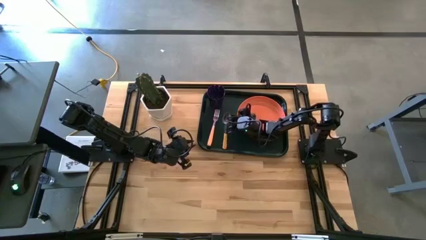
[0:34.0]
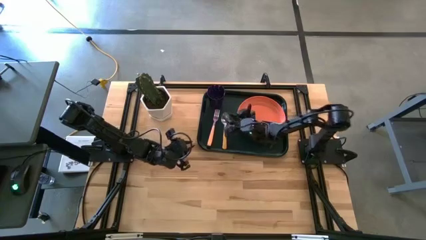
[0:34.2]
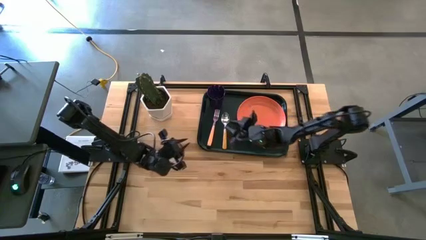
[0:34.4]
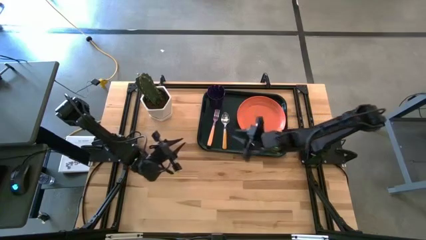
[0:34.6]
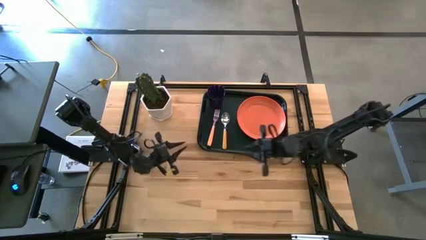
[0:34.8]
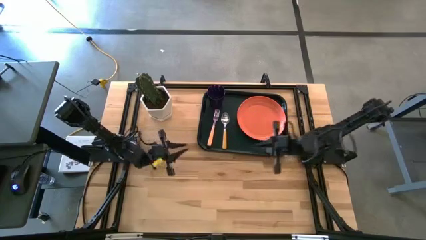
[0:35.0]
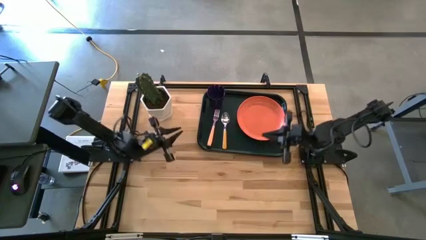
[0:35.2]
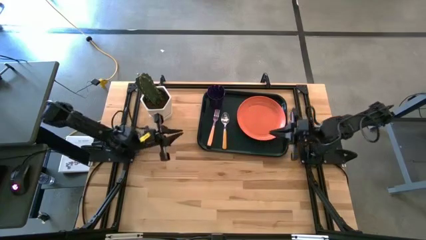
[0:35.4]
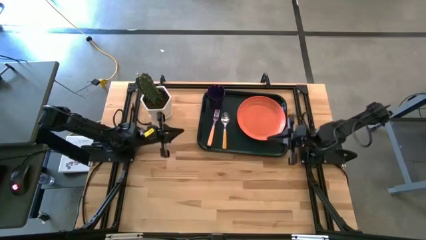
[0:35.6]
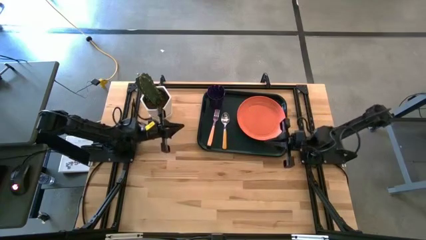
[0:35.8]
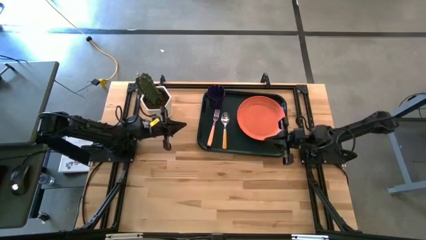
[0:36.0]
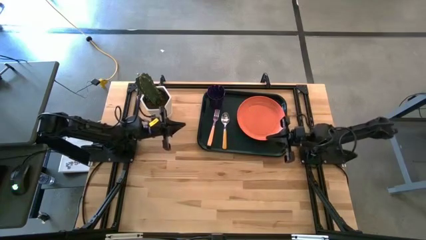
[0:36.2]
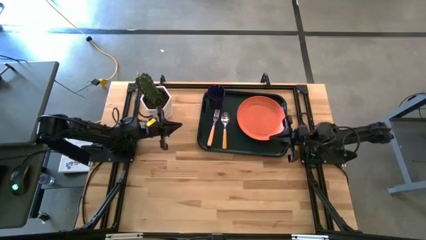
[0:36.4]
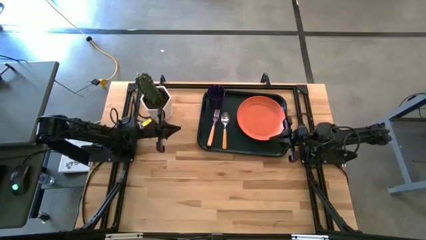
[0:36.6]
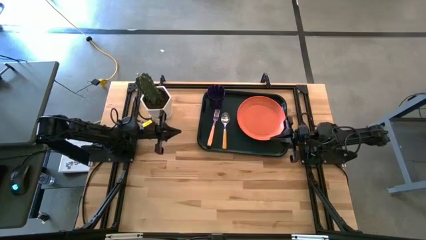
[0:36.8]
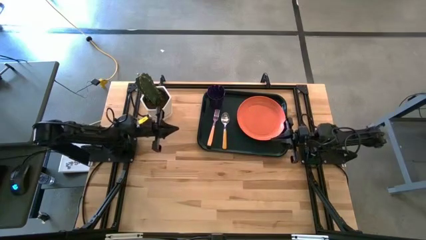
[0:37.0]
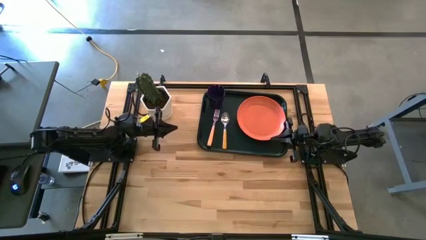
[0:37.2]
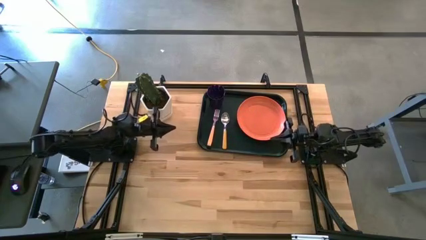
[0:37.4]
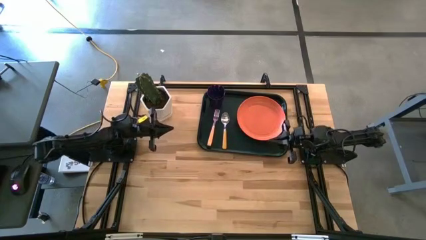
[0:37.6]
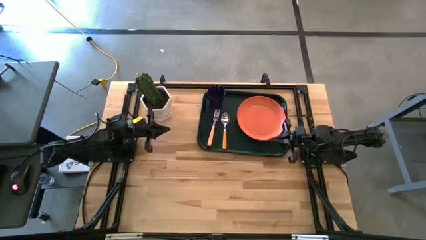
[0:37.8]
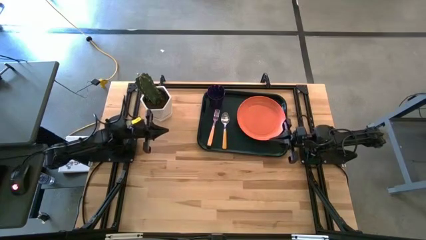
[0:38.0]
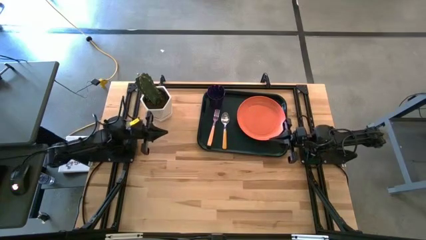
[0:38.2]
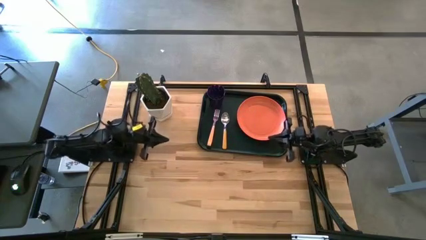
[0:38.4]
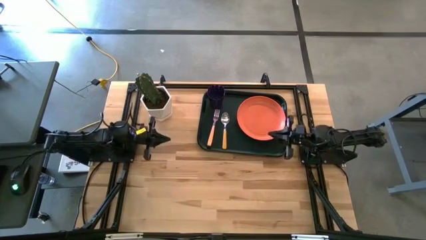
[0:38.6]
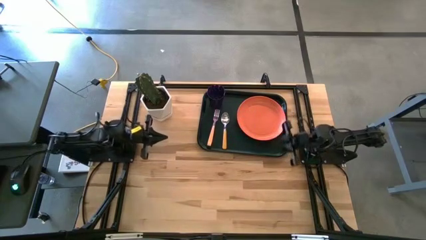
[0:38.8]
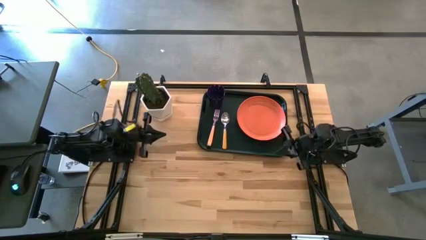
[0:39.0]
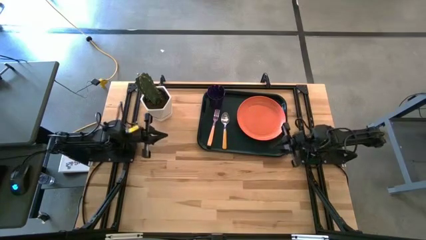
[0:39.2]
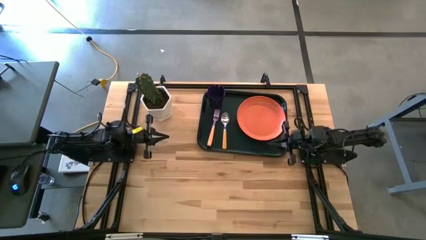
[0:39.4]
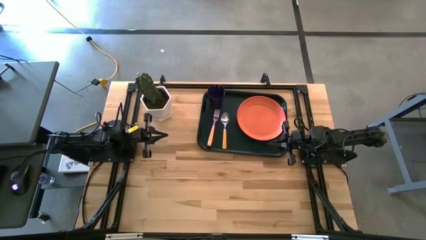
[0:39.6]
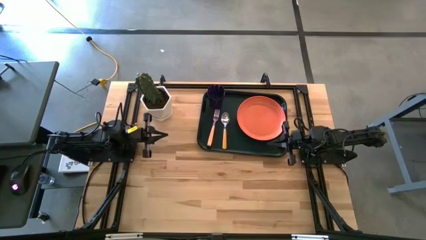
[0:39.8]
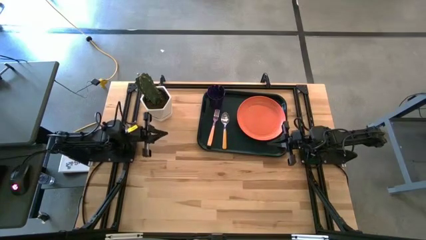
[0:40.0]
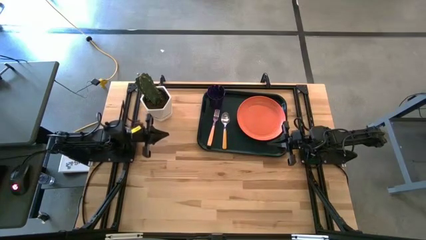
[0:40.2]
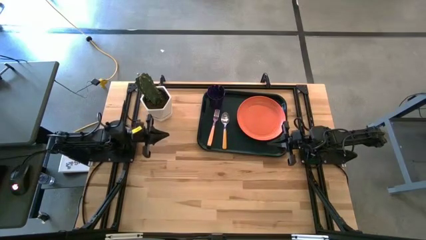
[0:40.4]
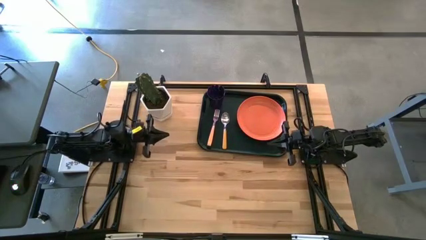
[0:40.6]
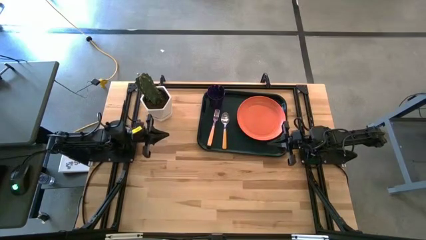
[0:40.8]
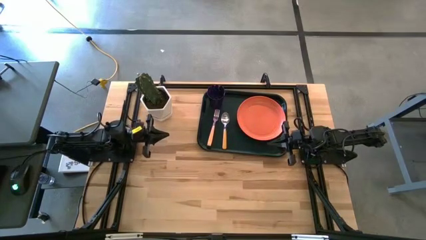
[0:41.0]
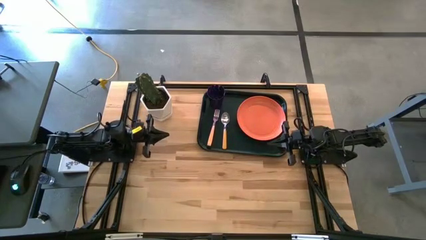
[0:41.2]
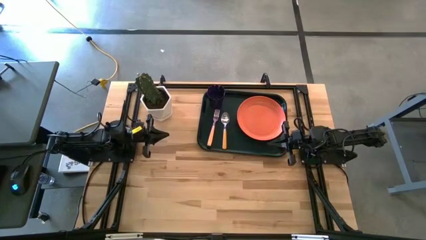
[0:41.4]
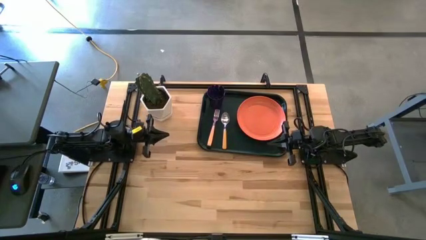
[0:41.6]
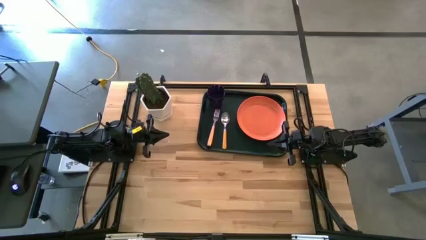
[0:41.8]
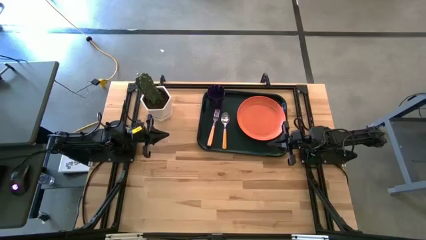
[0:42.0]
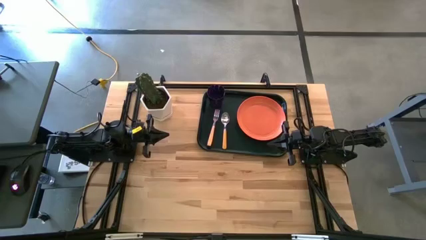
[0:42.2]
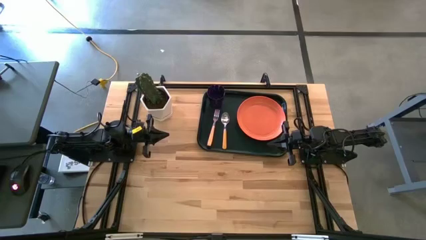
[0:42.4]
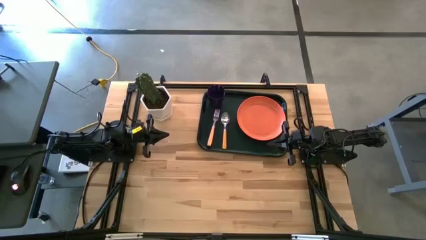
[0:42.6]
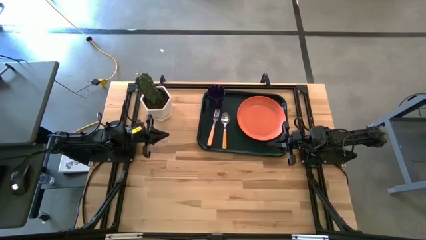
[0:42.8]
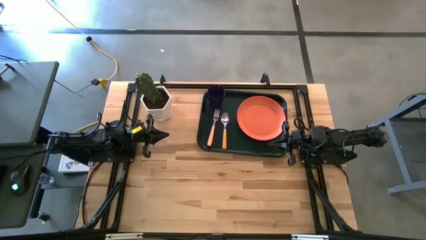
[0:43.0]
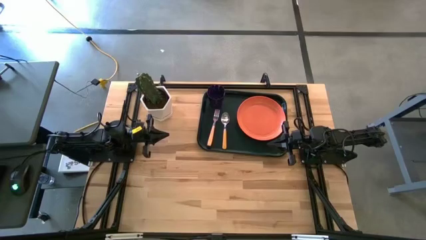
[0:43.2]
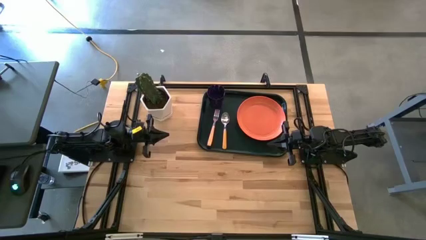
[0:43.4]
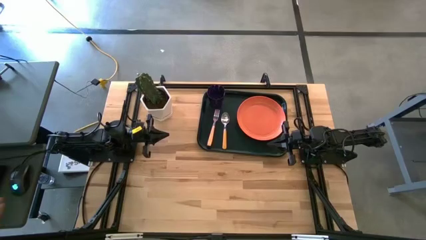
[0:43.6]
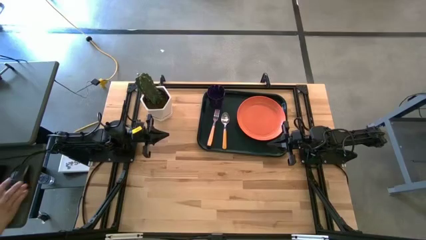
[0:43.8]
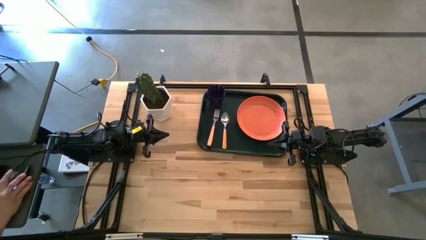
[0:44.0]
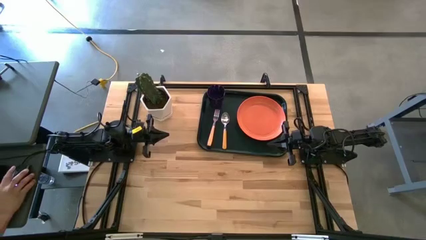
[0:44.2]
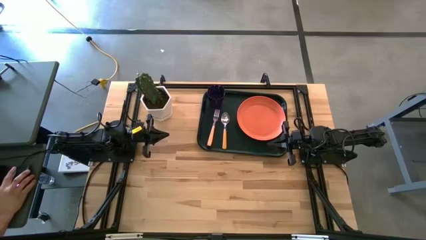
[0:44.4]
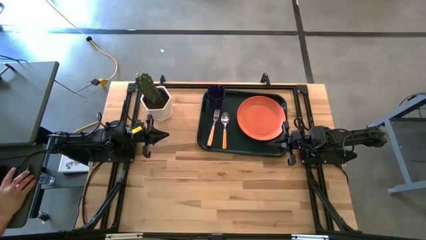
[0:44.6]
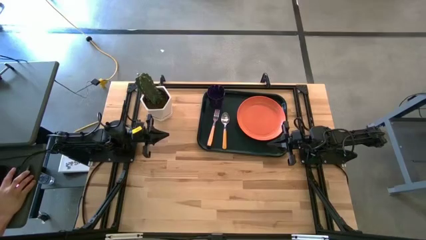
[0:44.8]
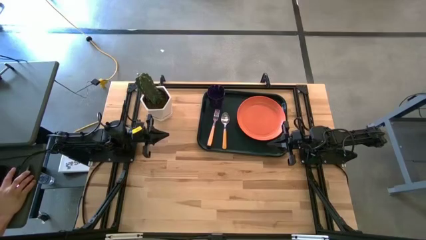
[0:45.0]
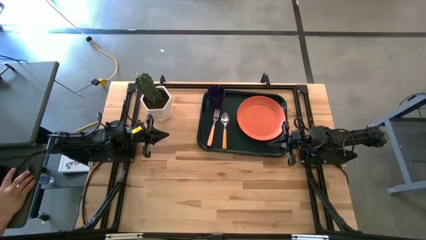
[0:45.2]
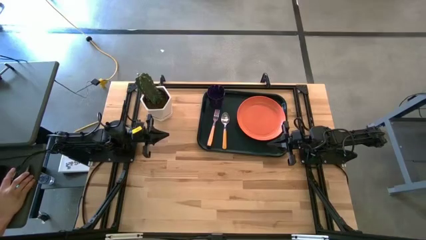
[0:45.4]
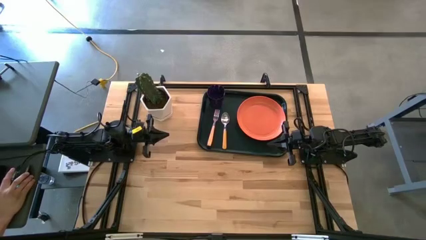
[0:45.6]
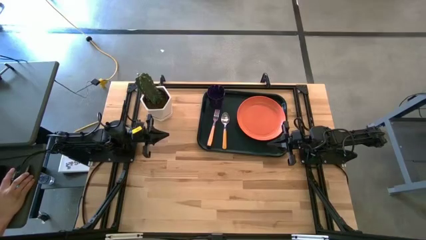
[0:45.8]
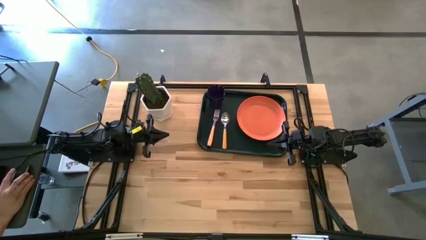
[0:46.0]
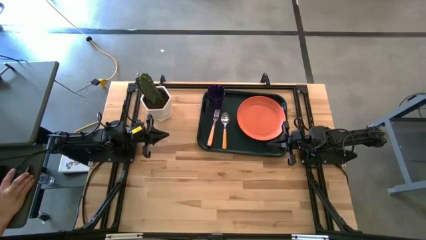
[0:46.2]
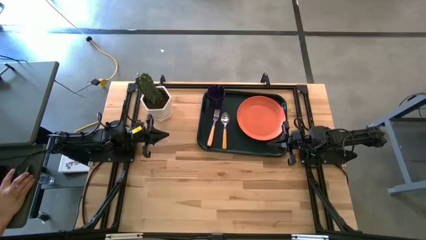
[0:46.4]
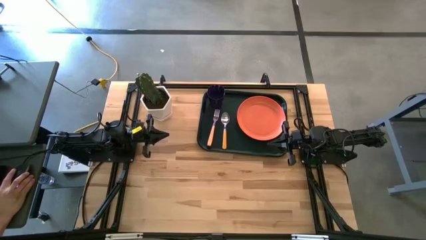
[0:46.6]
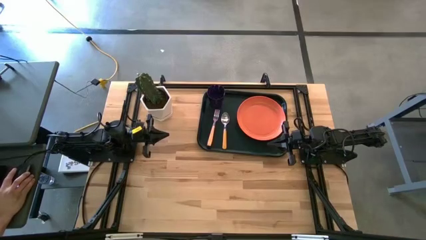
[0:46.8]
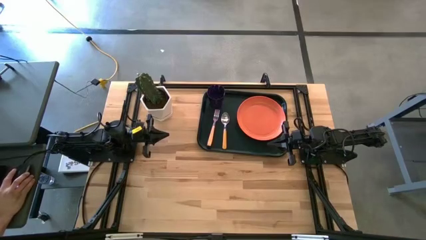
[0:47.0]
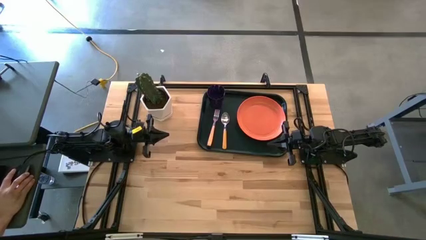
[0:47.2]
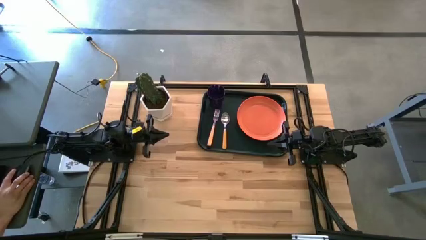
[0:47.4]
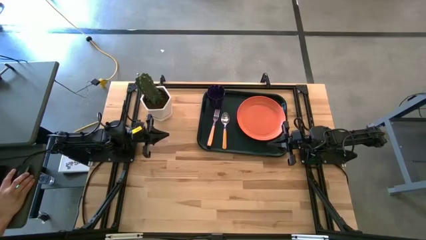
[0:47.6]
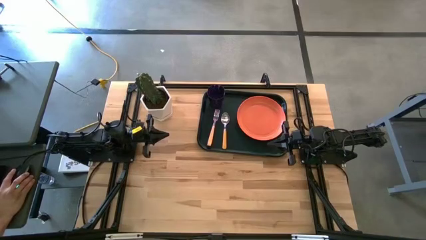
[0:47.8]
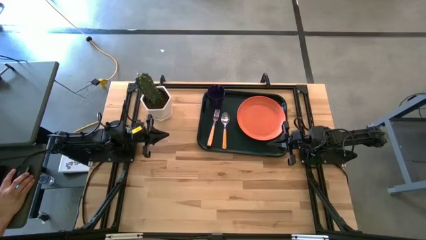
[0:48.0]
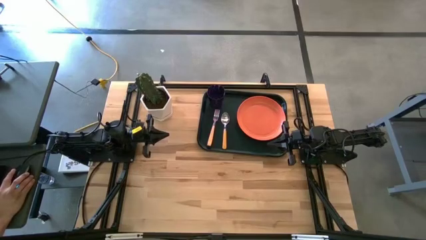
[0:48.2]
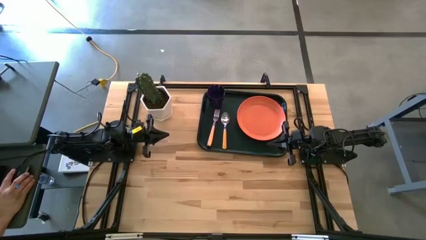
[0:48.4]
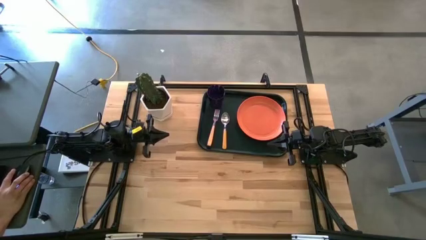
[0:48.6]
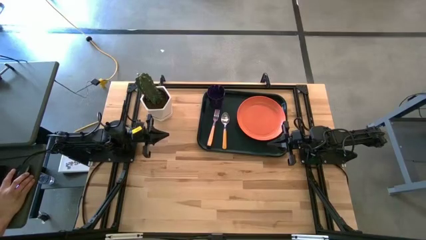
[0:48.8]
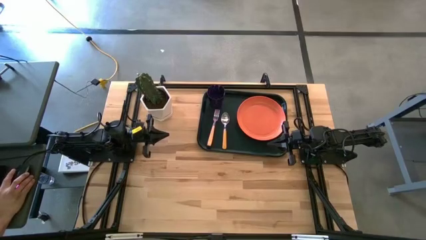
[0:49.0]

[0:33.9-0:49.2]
Task: Pick and place plate/cup/fork/spoon on tray
Return to Home Position
